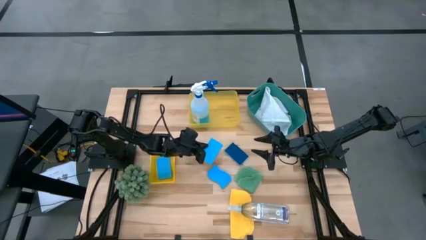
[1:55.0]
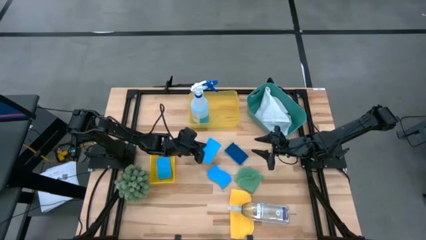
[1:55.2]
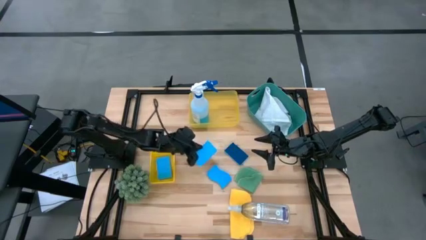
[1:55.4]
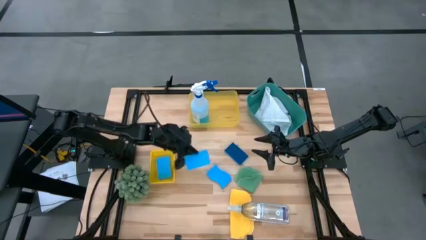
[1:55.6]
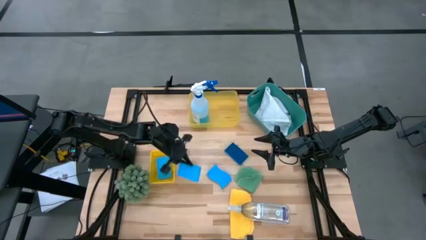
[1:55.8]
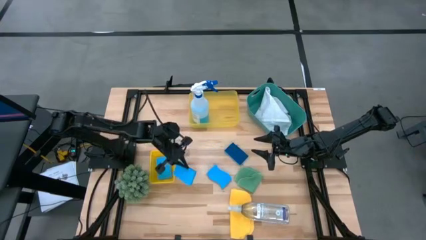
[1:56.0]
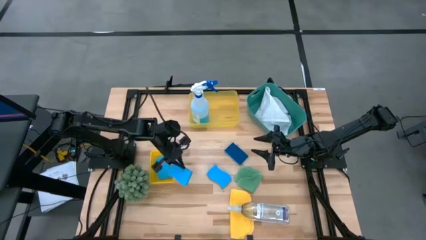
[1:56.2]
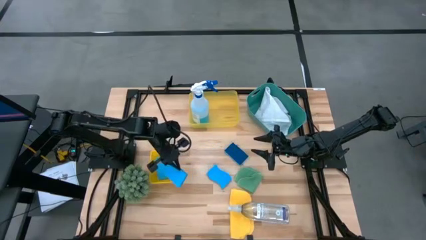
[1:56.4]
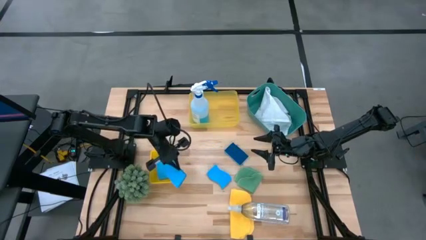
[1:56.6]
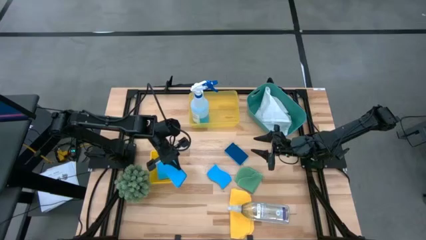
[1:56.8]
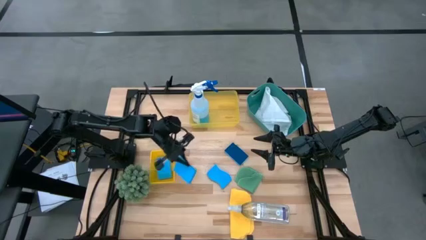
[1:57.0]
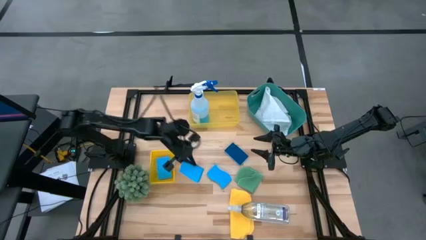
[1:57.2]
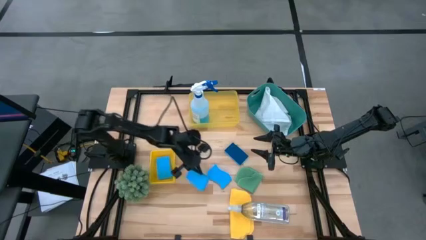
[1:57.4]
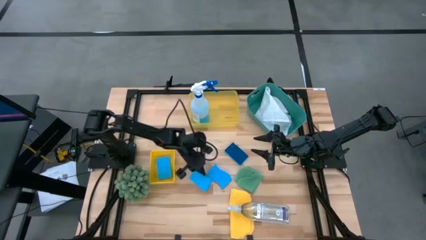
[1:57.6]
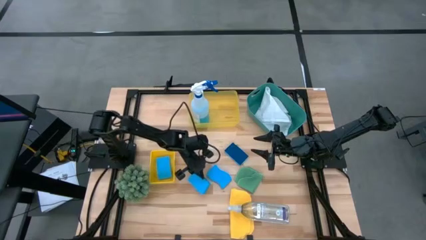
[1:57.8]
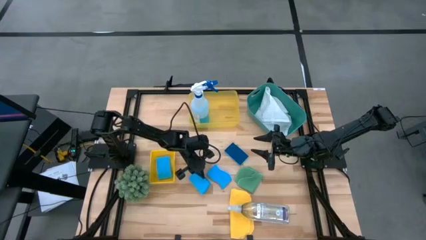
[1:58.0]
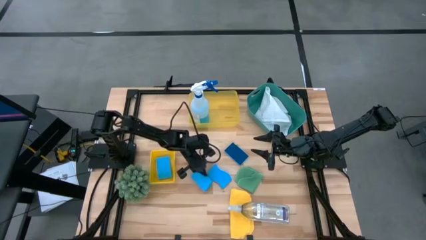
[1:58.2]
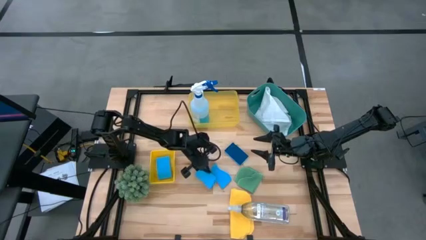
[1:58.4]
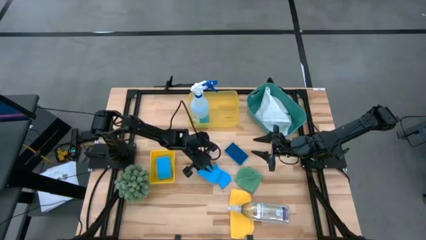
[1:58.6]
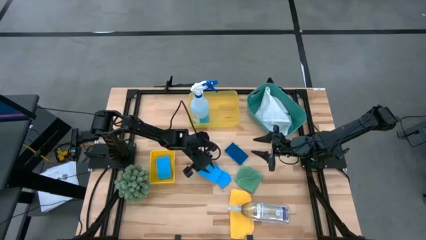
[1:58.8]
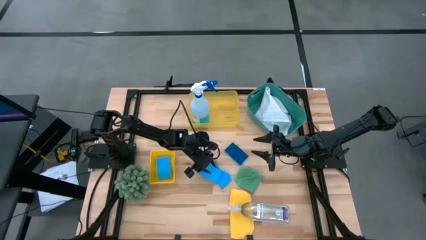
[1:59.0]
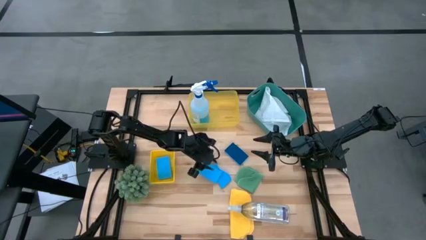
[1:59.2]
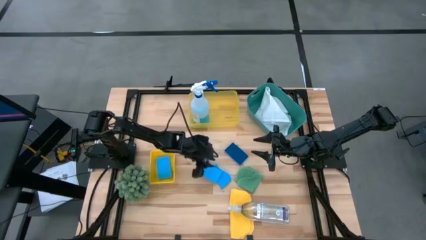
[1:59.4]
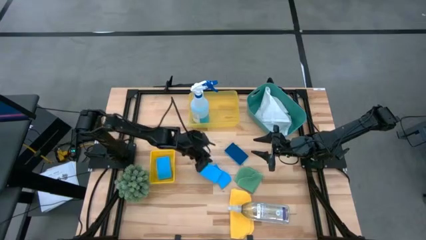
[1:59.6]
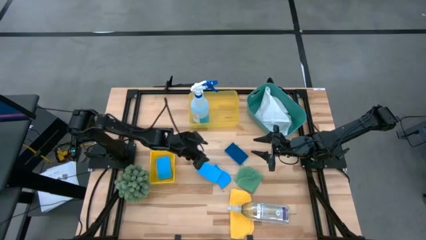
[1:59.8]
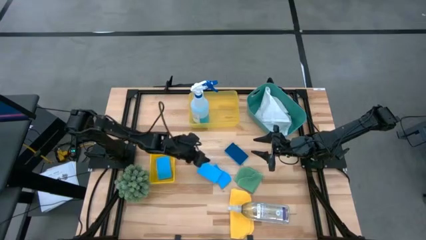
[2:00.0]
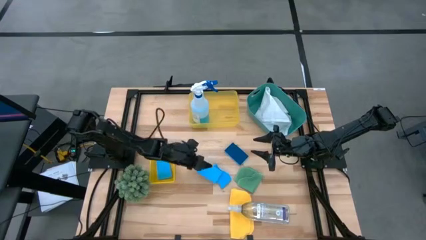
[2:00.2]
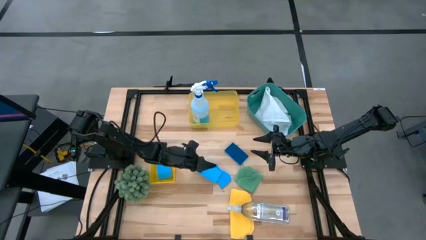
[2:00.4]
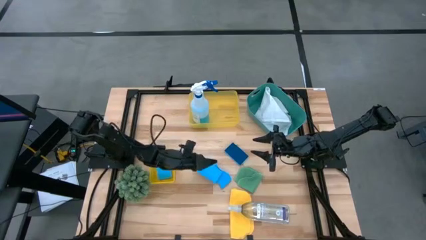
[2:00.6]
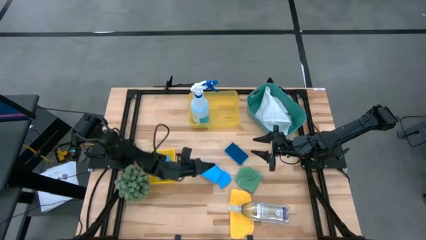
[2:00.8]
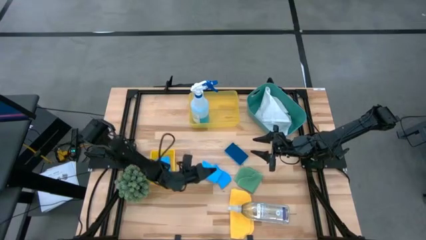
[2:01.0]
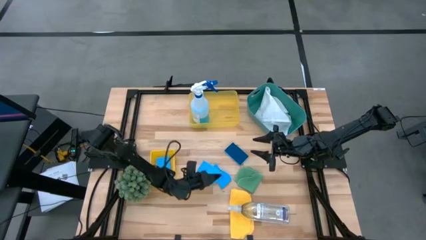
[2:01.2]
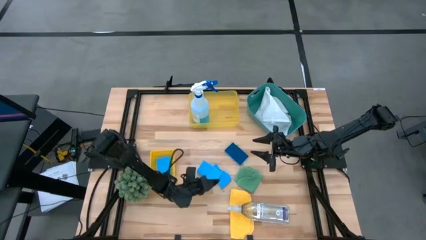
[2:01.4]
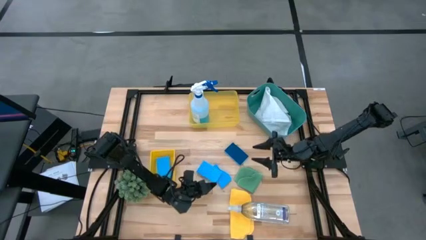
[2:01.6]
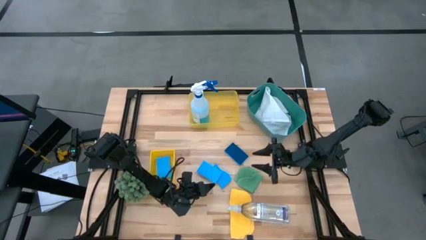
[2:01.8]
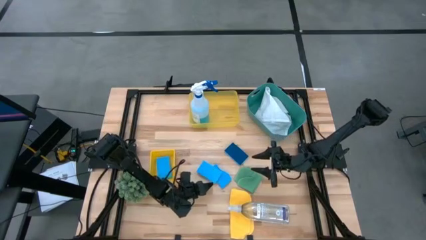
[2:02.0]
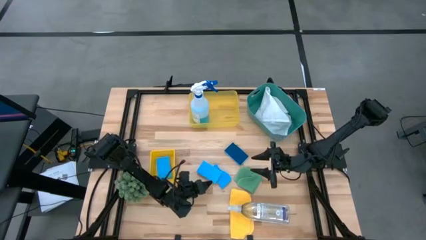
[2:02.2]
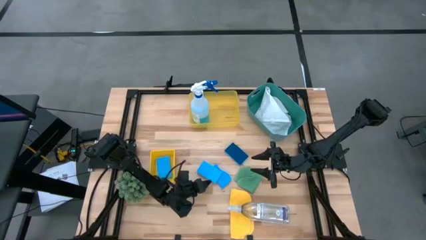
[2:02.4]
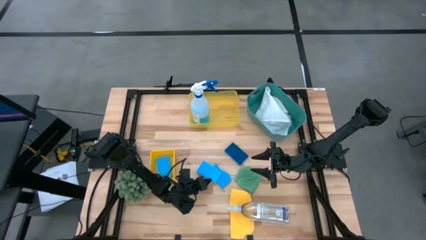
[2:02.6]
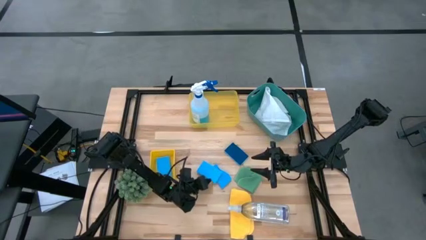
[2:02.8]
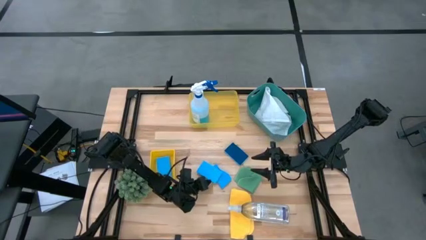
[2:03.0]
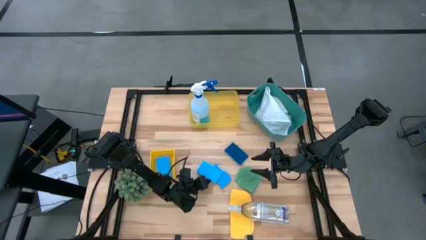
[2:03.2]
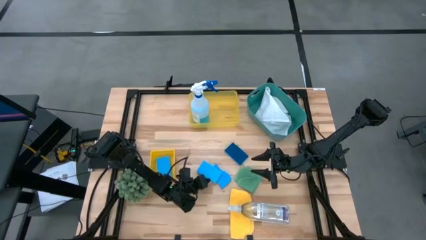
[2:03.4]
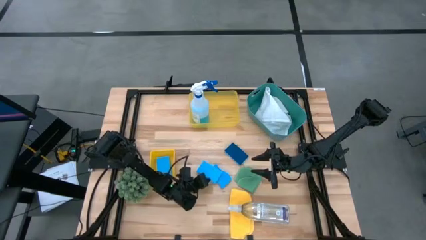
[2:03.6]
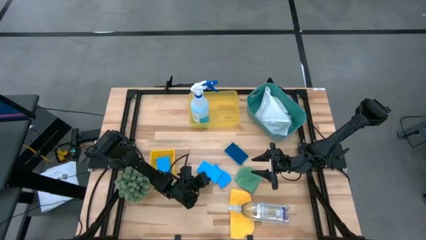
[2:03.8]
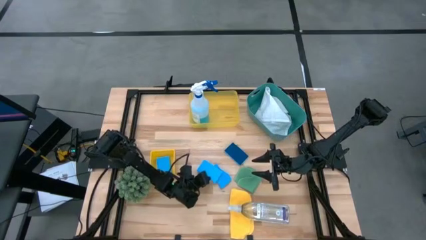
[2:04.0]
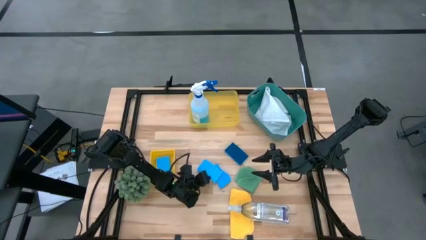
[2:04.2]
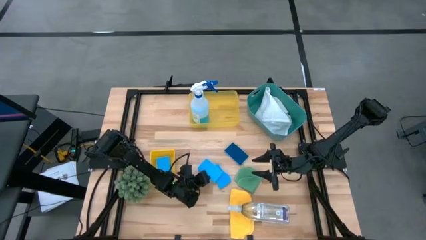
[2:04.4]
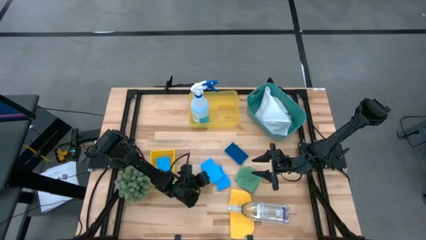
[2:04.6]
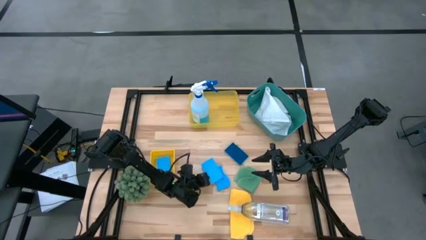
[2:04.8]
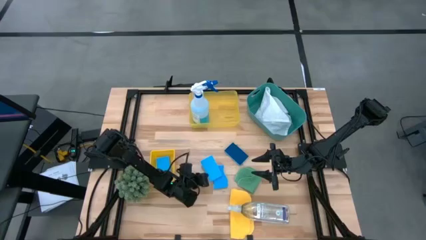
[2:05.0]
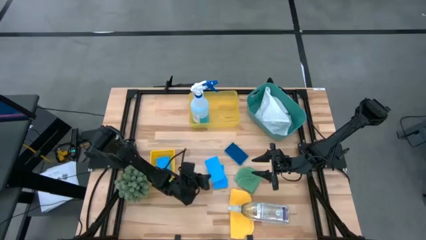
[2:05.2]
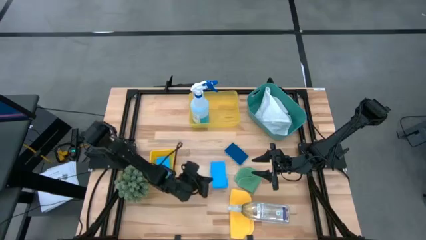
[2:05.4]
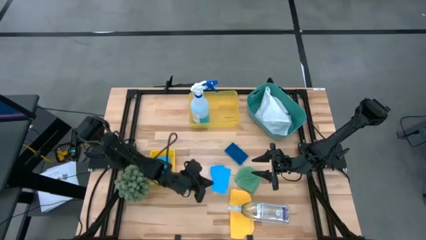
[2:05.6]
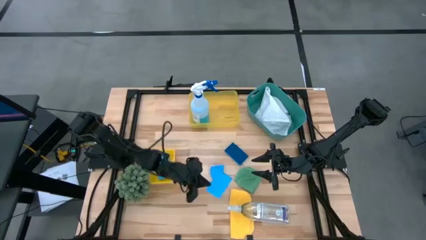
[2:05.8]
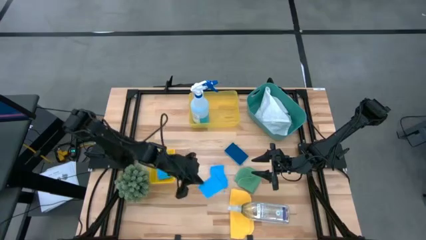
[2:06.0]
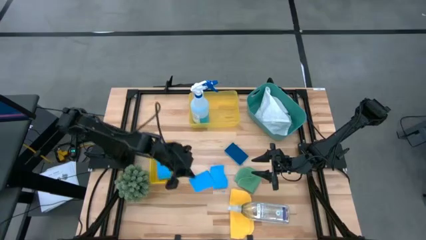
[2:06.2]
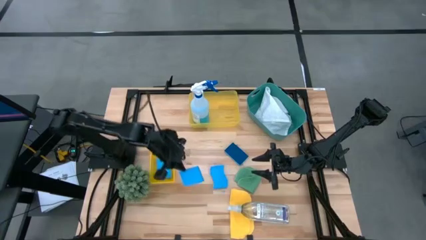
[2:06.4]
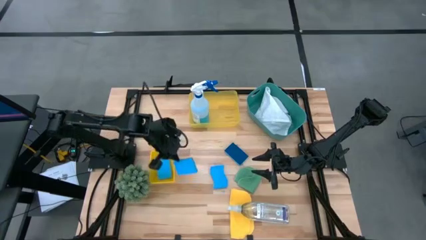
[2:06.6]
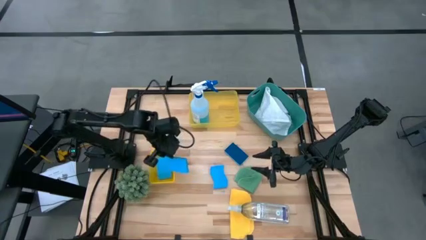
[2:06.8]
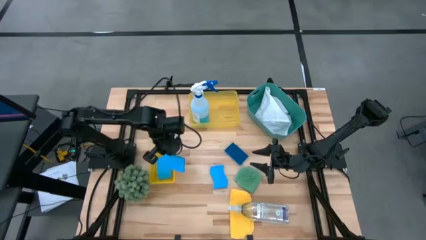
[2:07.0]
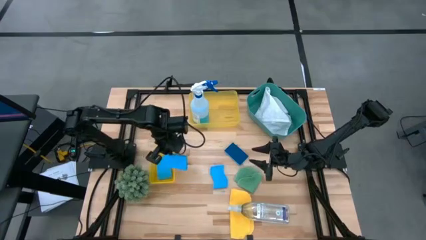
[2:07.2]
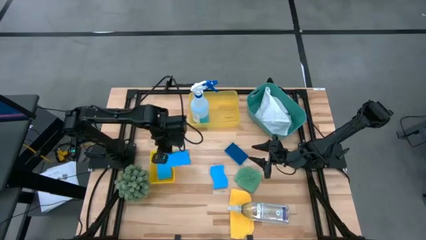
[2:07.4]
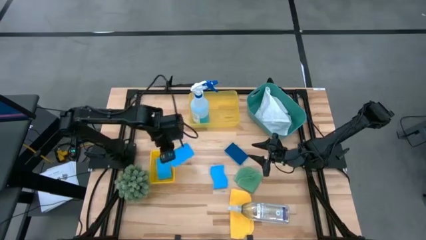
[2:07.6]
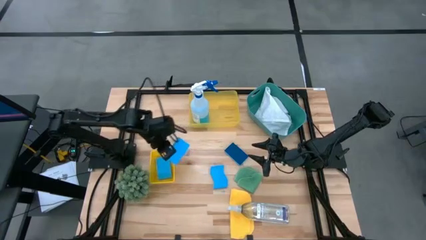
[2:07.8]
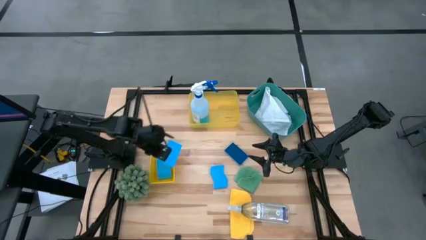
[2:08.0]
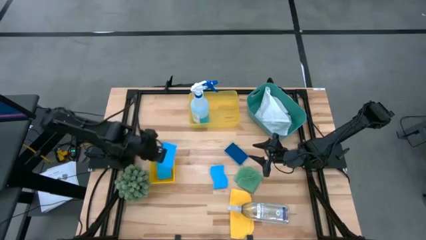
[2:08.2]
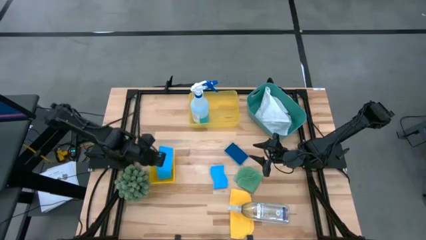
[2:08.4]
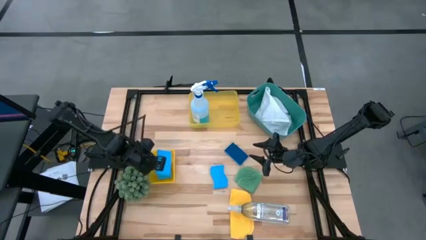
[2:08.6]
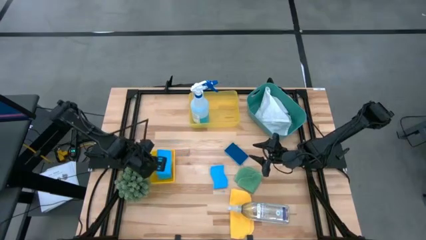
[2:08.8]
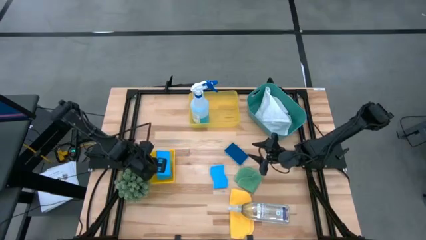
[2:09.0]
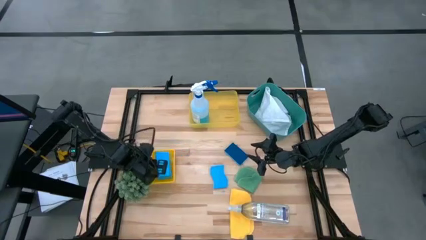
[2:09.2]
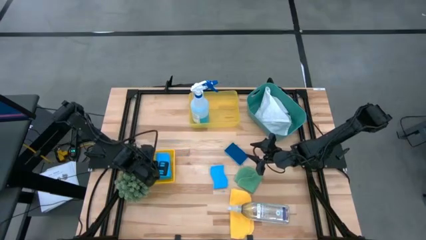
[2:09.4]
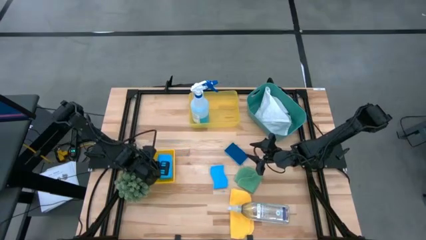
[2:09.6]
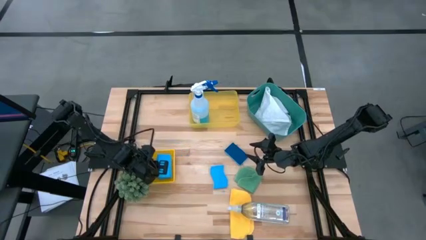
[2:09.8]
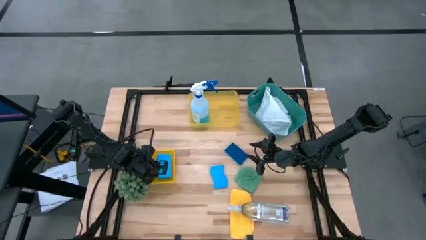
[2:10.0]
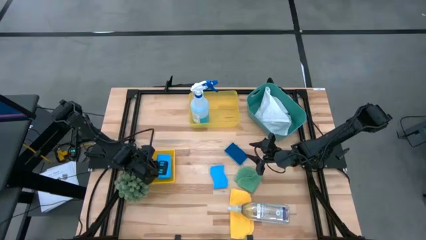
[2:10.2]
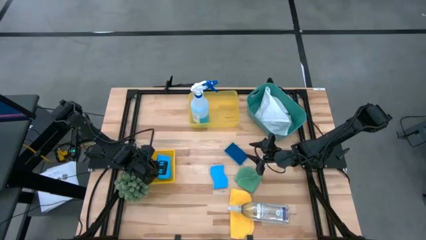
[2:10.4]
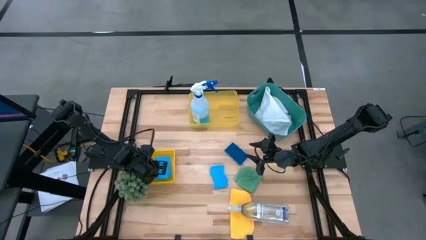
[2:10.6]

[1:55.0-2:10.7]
Task: Pick & Place Kitchen Items
Put the blue sponge into the bottom yellow bin
